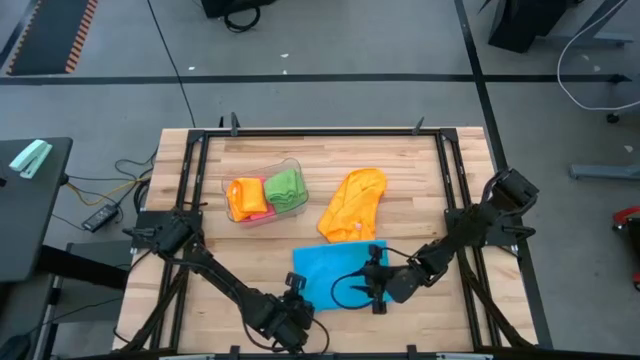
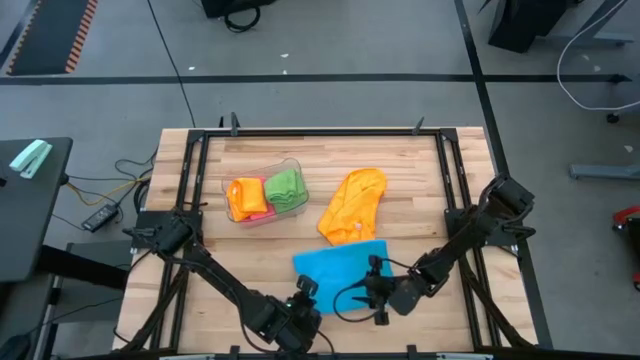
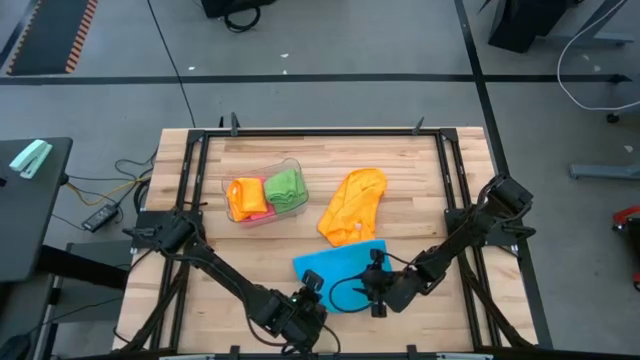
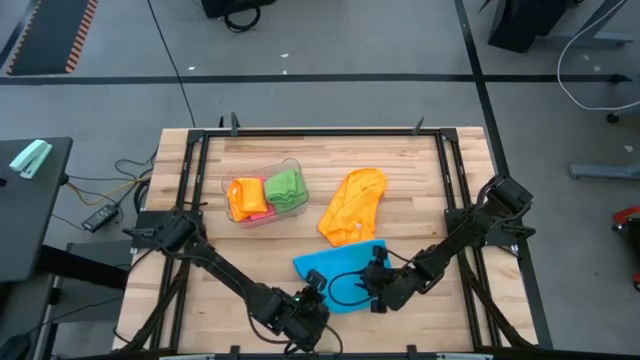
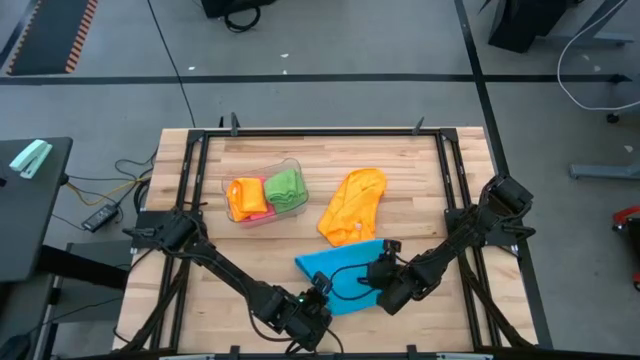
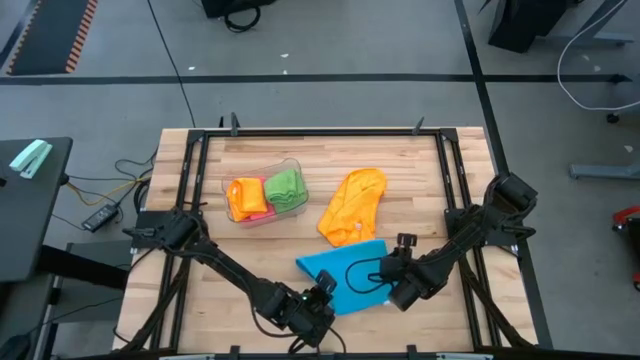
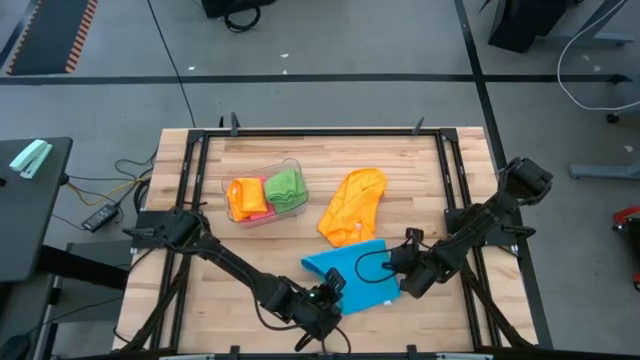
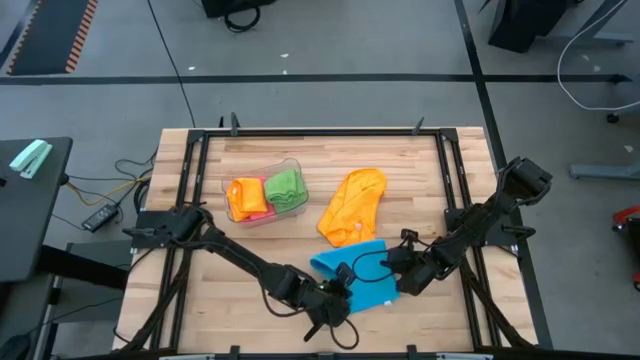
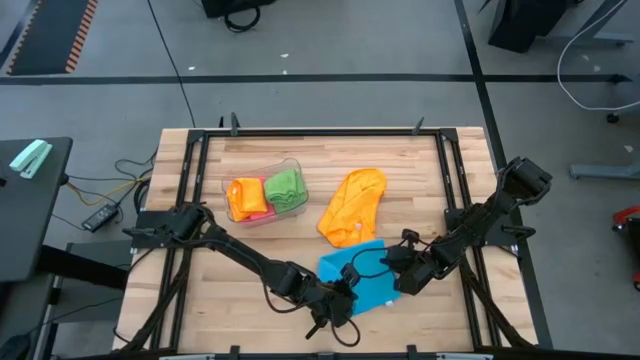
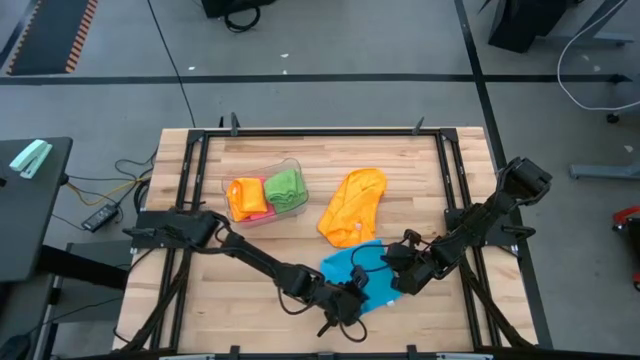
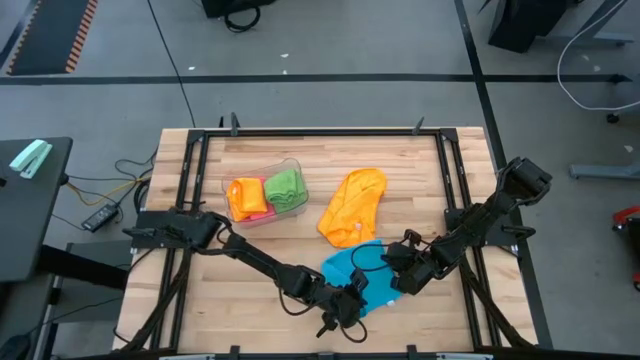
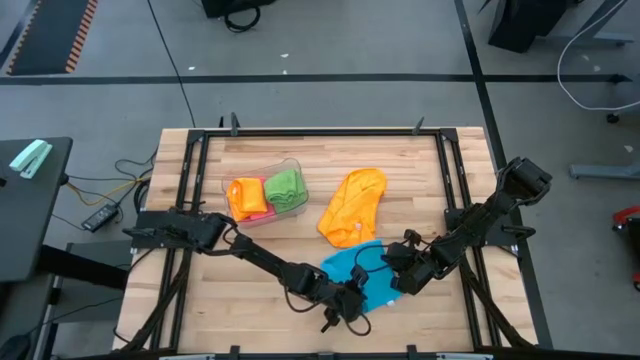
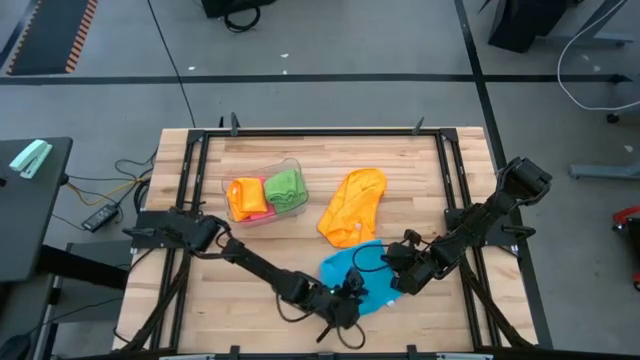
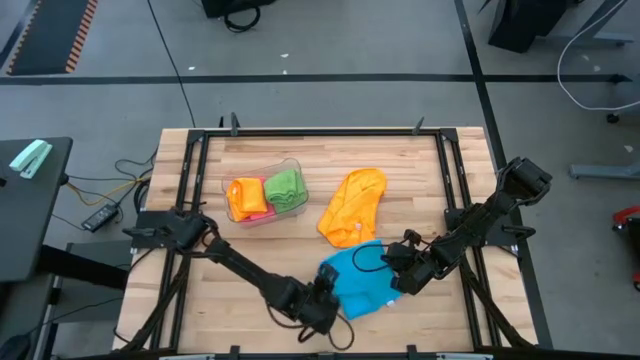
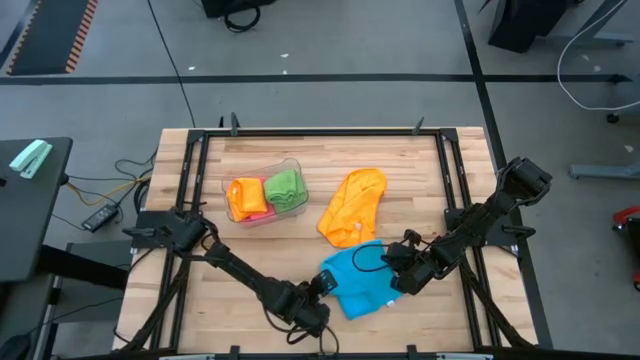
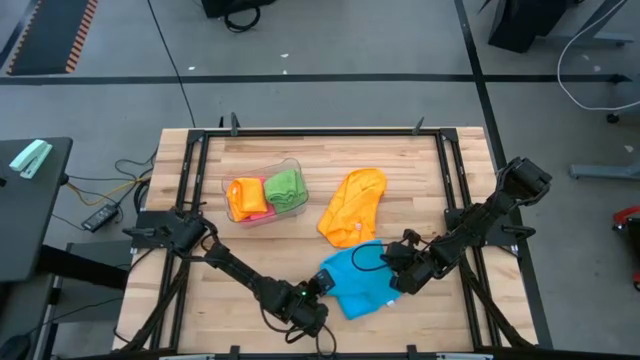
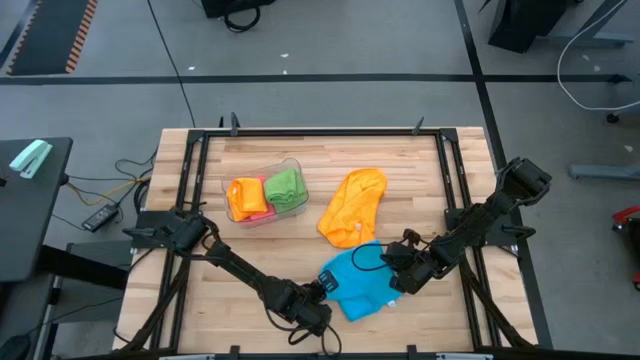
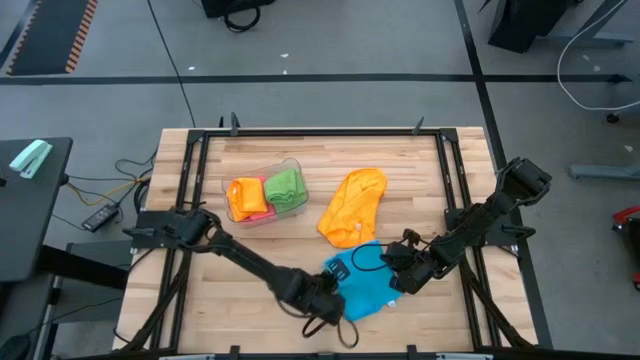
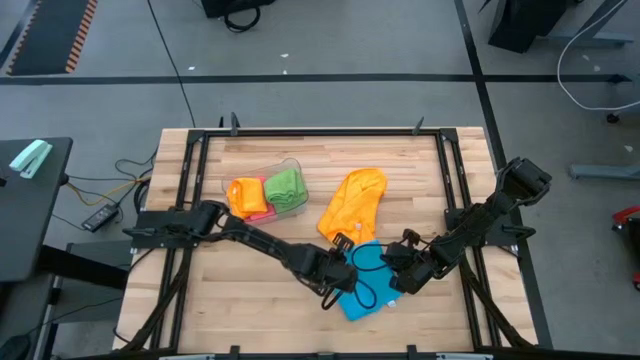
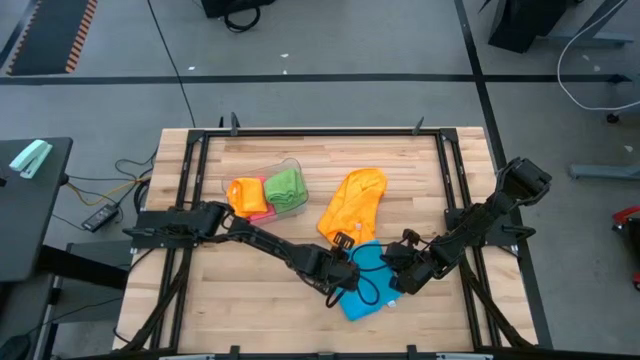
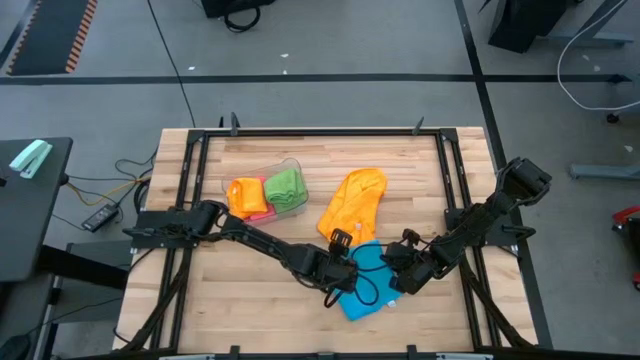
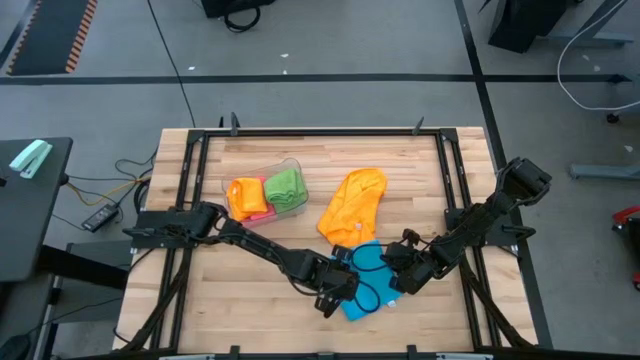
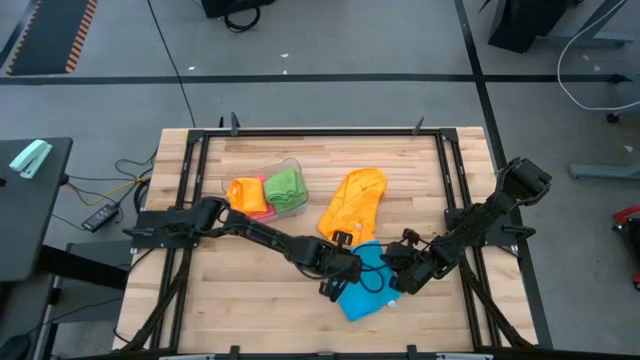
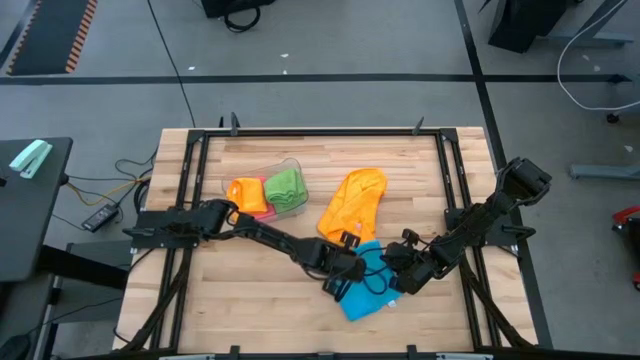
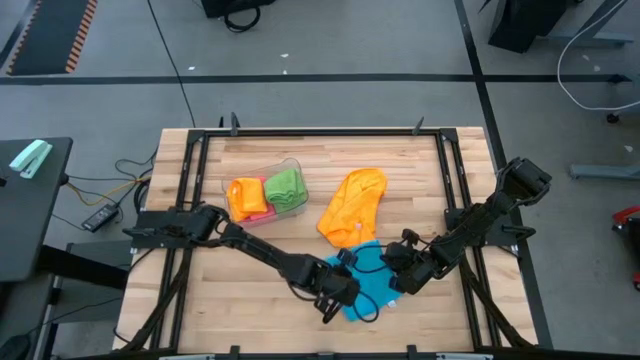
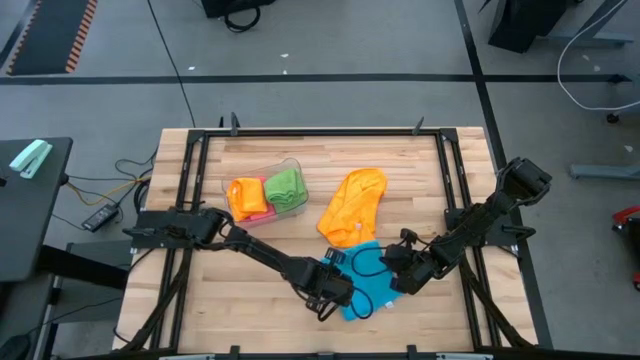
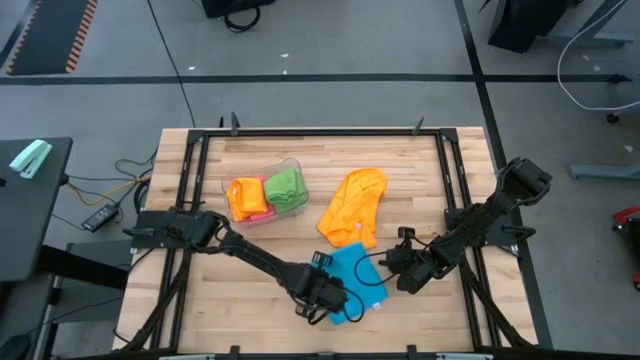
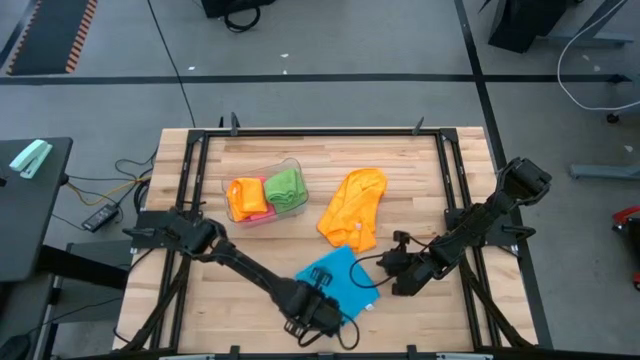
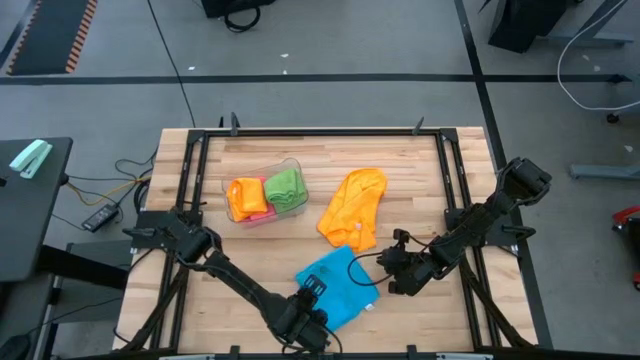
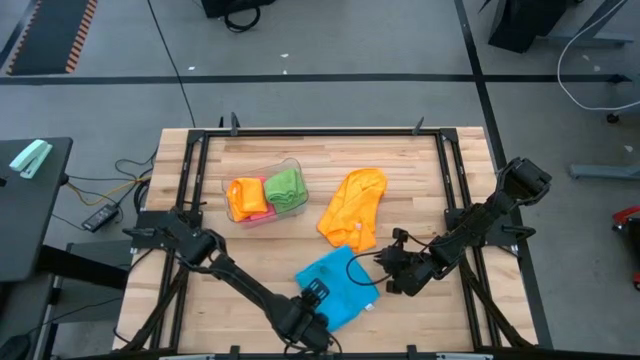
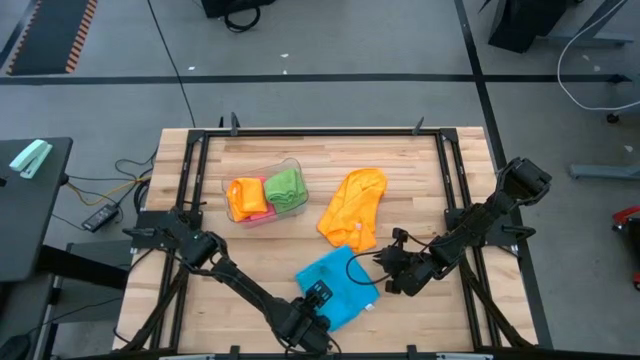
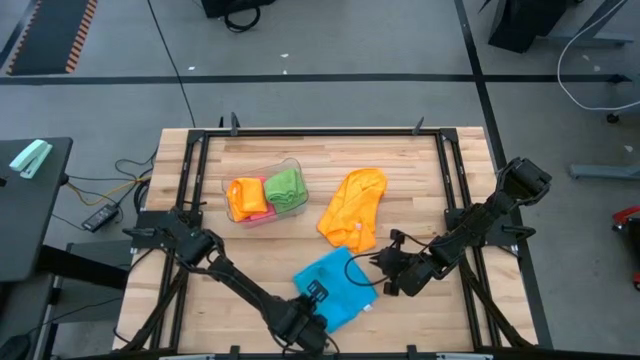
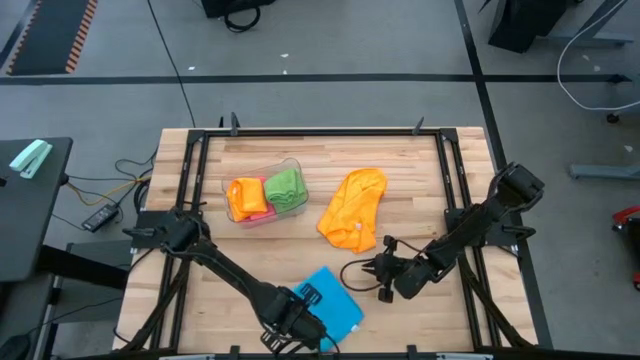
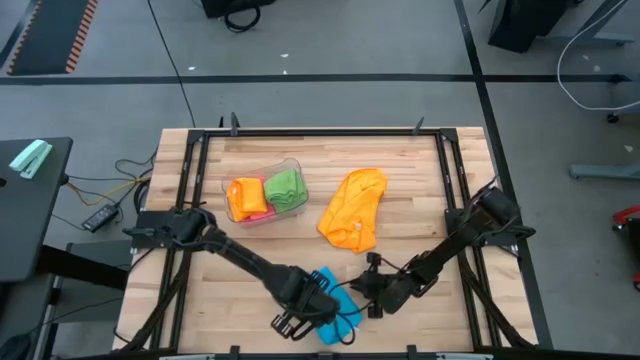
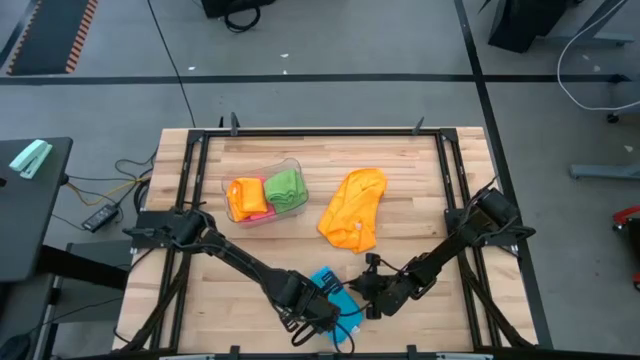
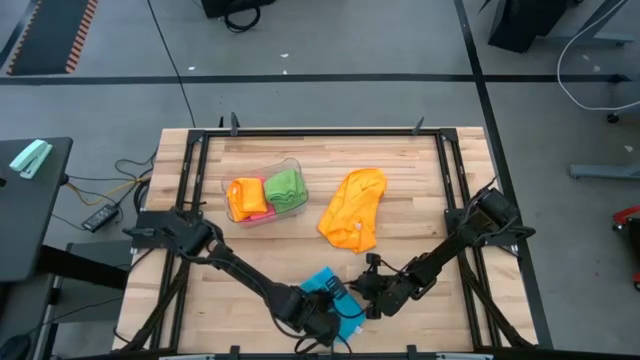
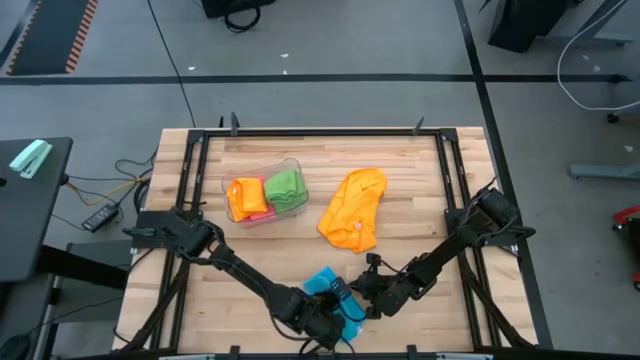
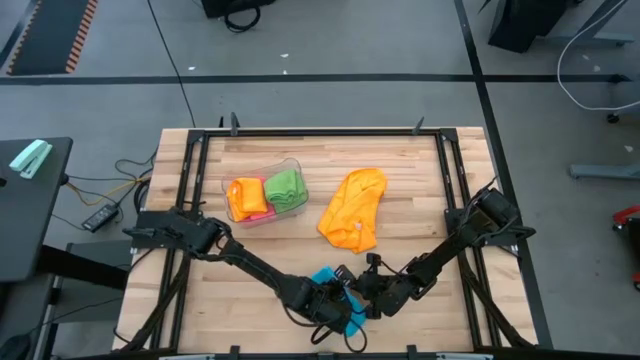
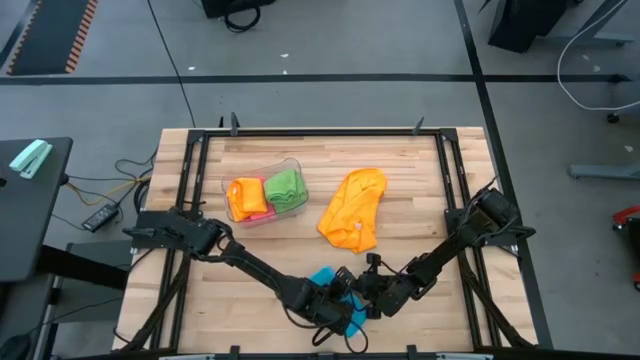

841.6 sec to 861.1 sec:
Task: Fold microfiber towels
Fold the blue microfiber towel
